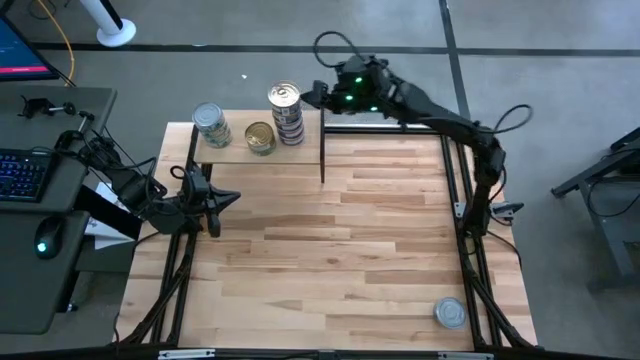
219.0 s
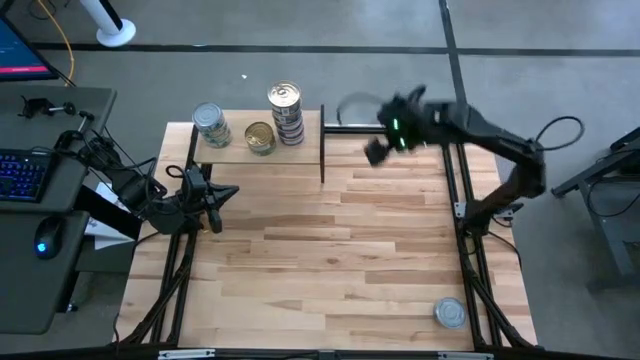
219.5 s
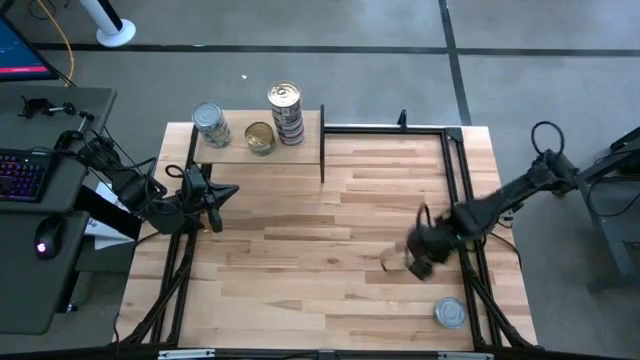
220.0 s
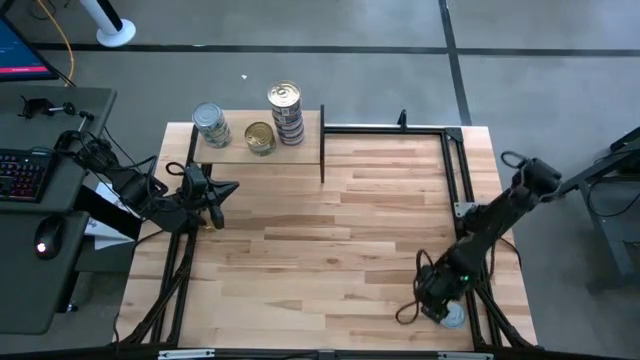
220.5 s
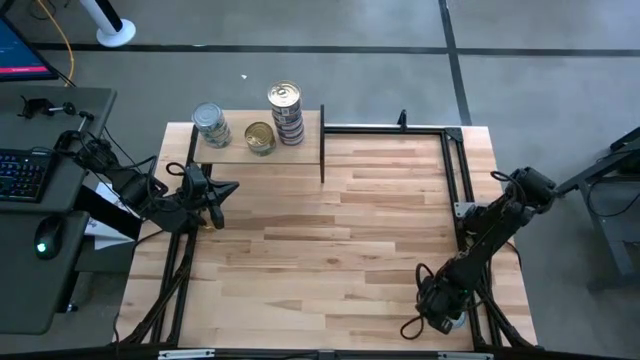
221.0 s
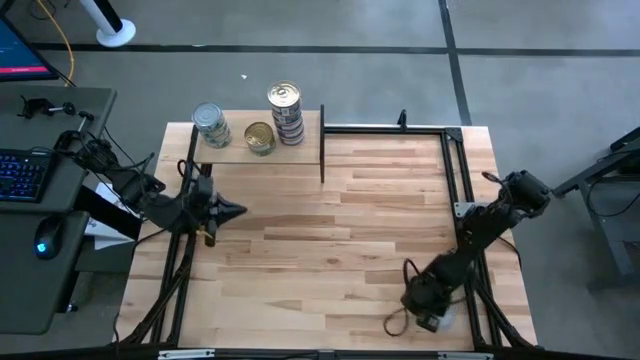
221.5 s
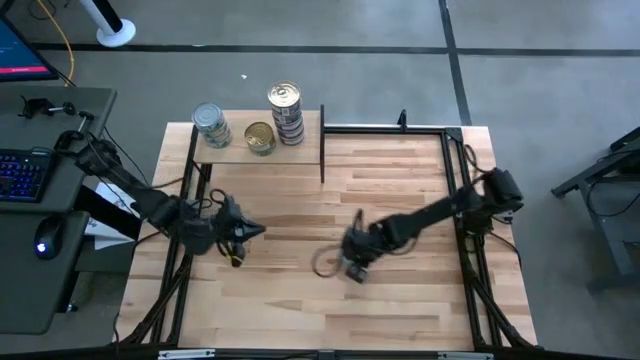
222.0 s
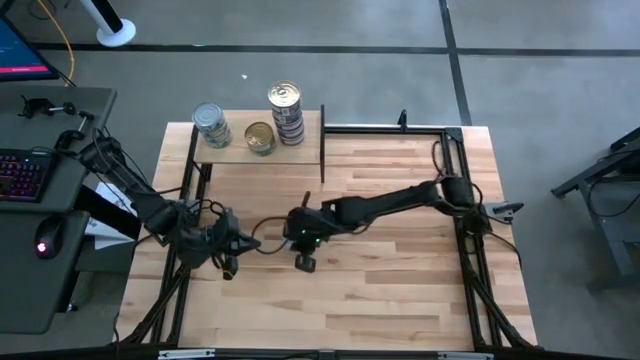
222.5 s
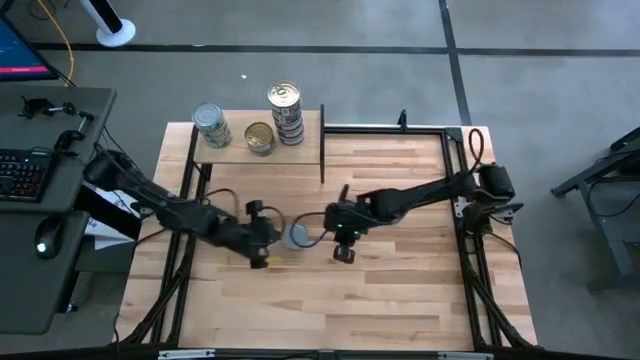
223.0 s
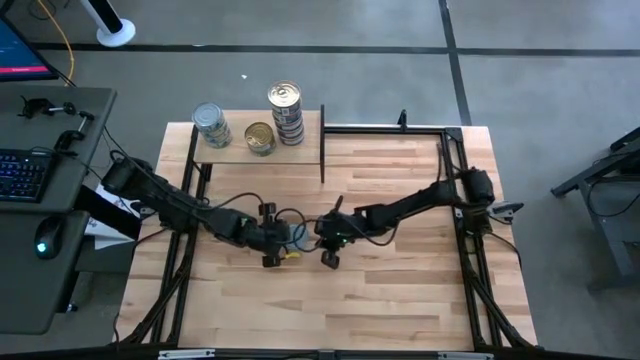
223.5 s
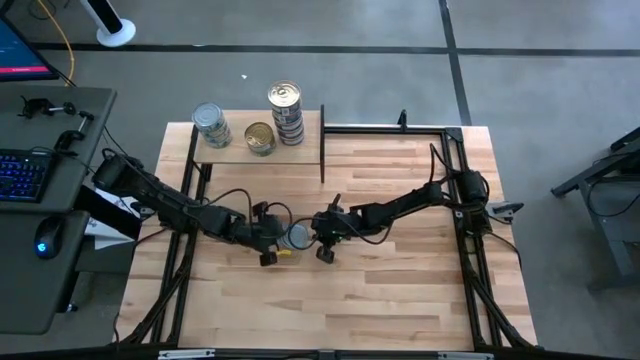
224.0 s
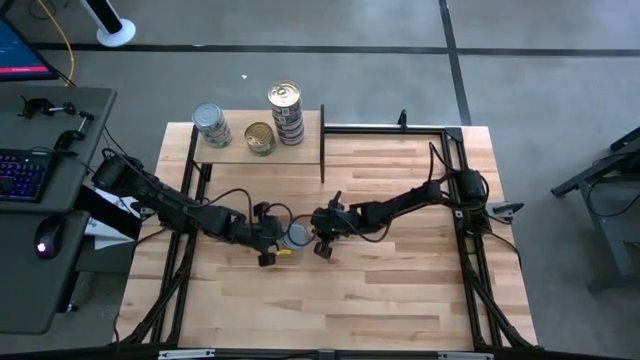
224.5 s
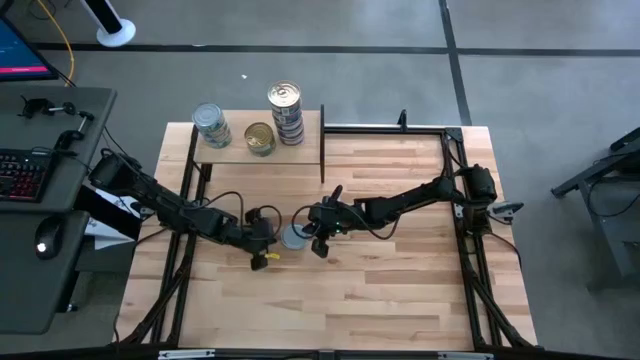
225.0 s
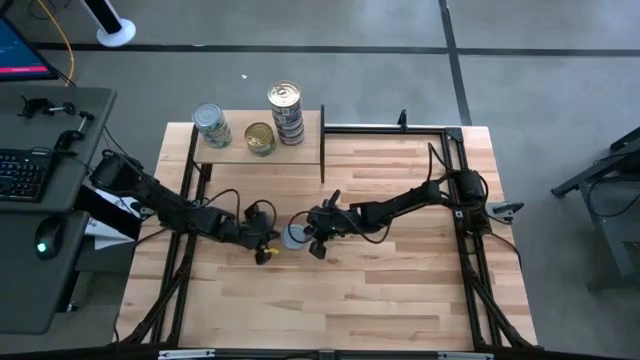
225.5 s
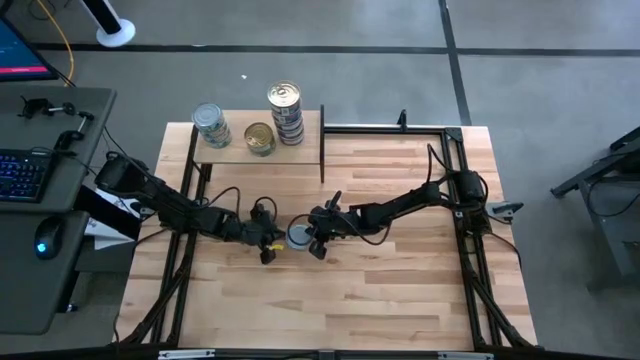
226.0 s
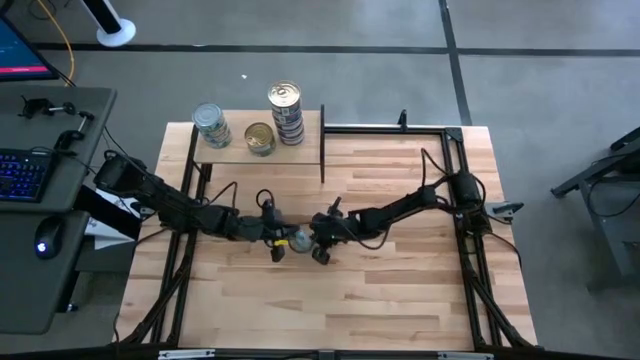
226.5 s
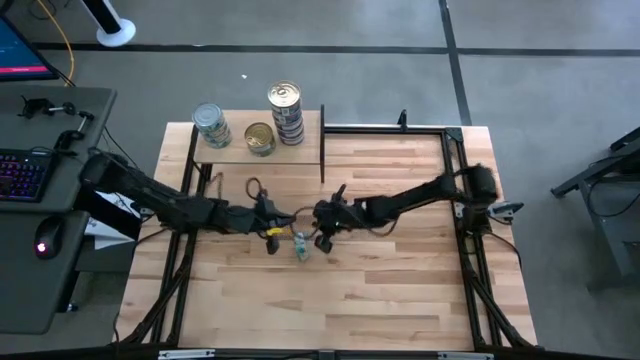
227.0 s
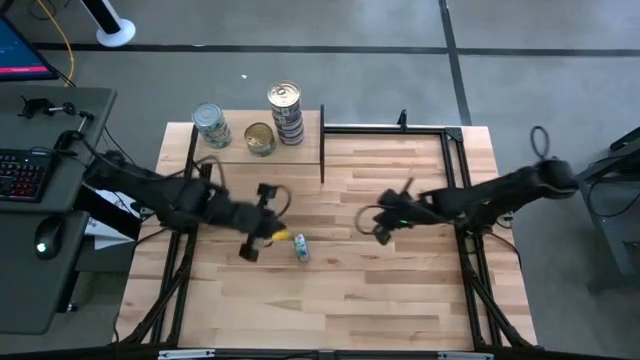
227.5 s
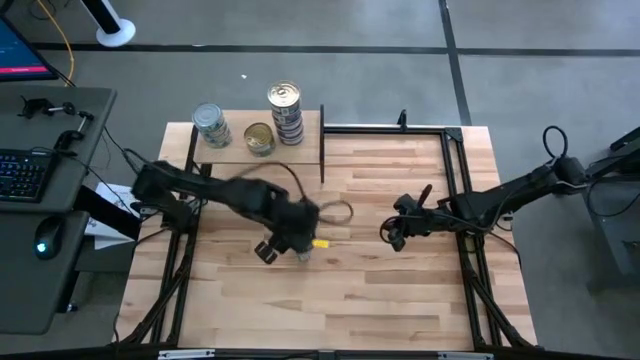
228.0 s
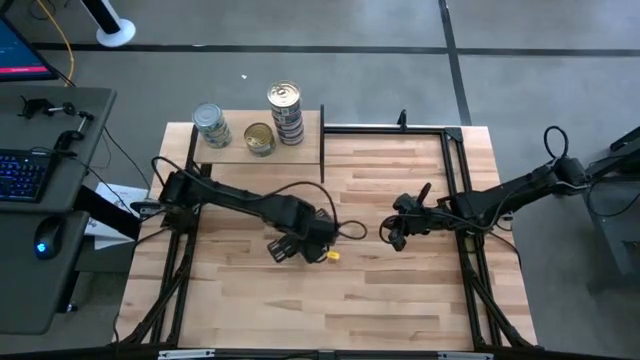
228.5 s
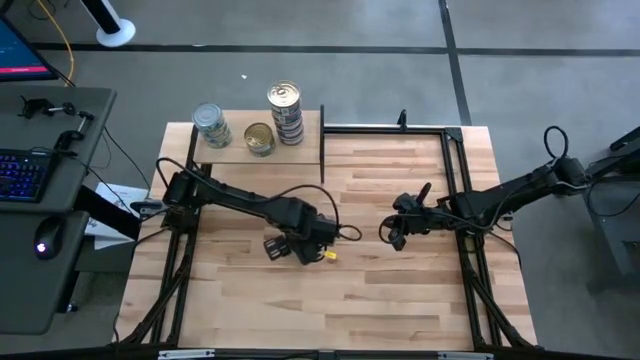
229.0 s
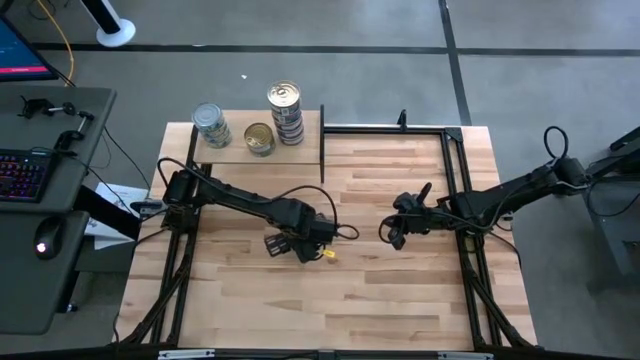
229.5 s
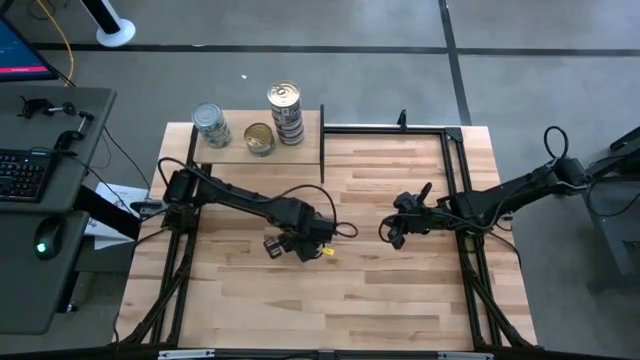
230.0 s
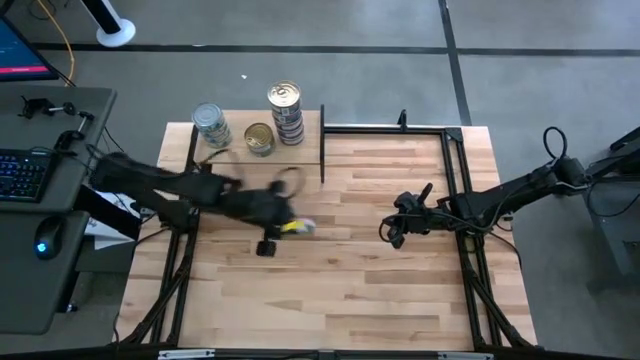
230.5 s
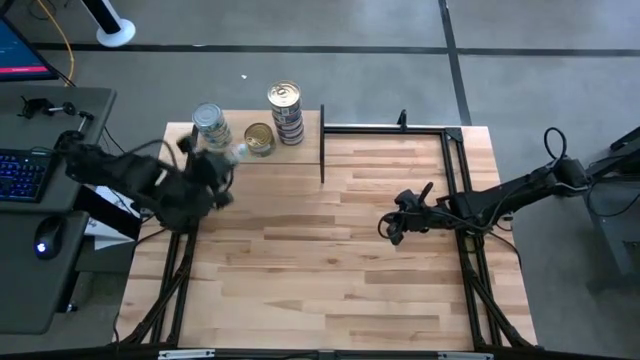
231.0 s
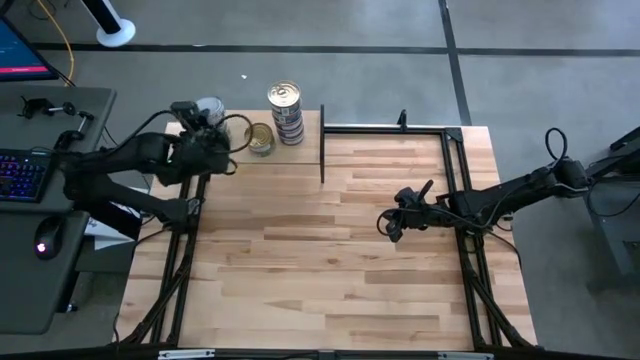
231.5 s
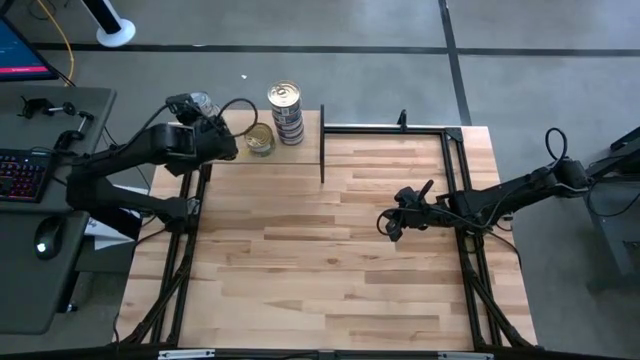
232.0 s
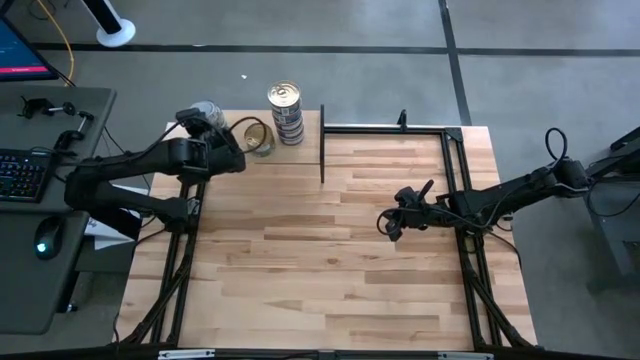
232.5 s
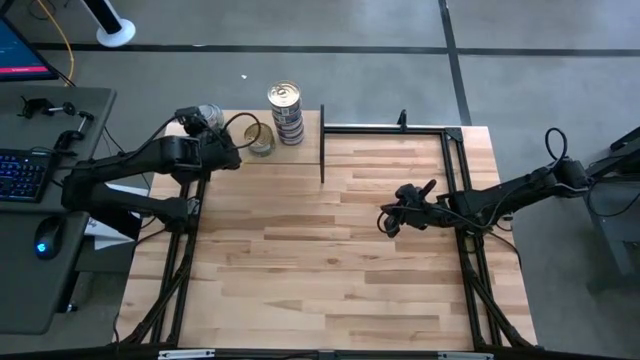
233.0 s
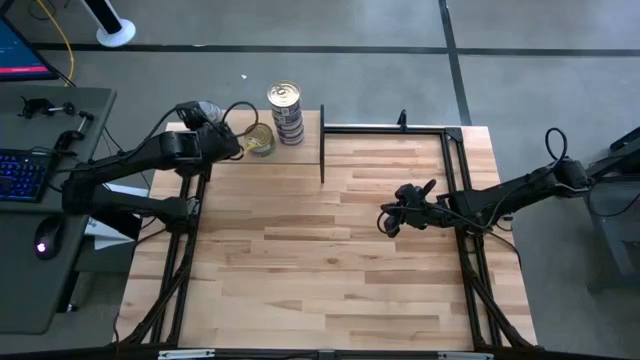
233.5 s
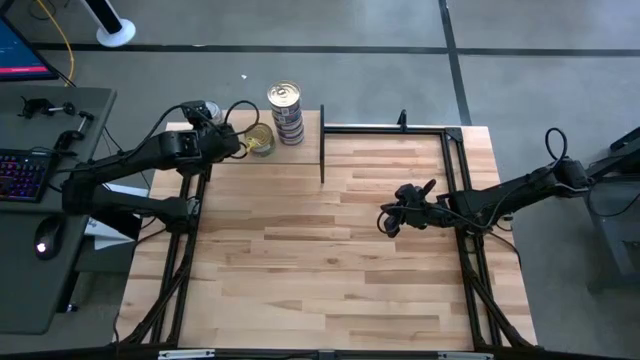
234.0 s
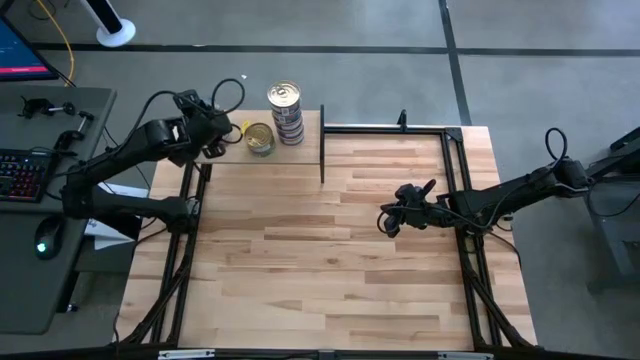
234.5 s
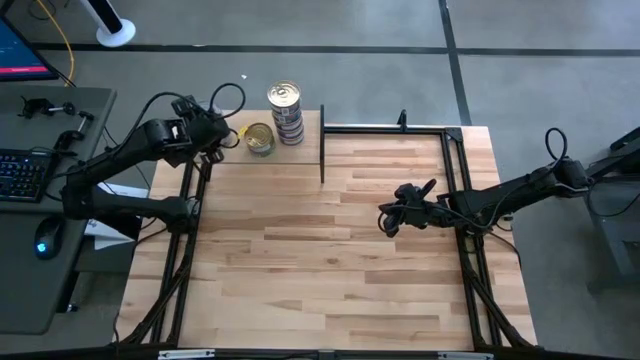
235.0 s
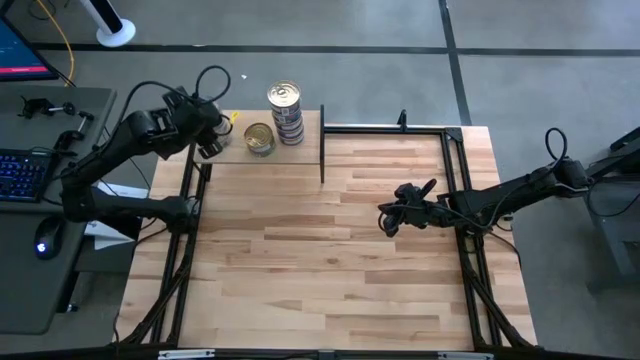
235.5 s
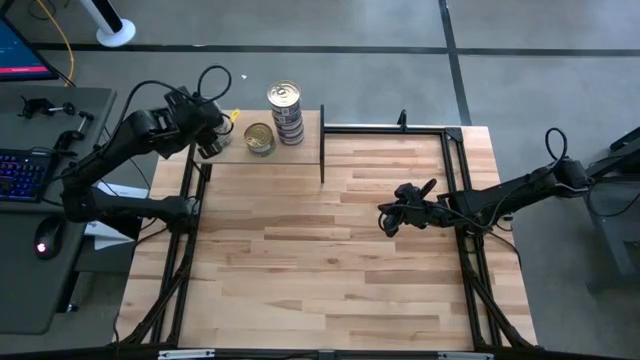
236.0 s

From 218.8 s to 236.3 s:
Task: Stack canned seafood by type on shelf
Stack the green-white tuna can on top of the green-white tuna cans on the shelf

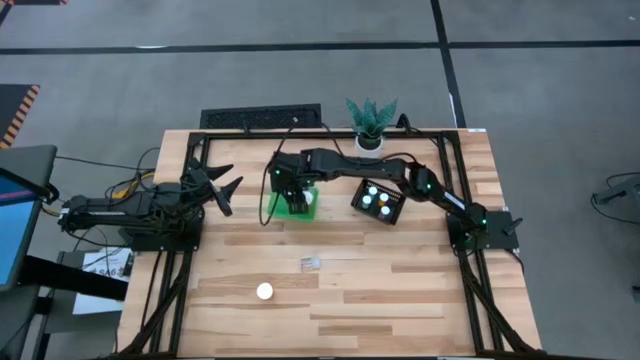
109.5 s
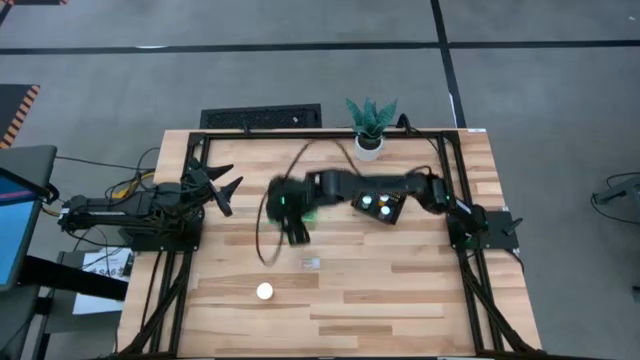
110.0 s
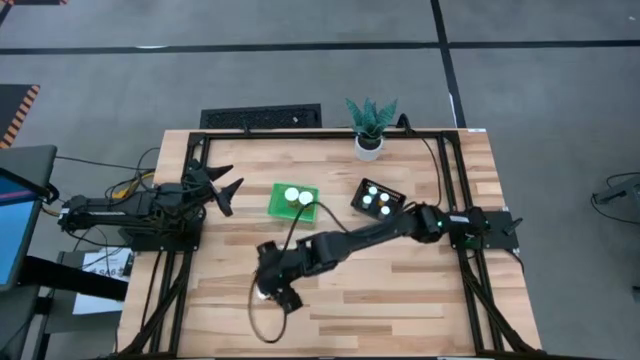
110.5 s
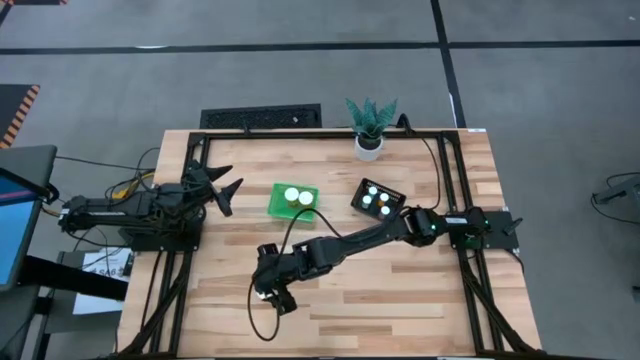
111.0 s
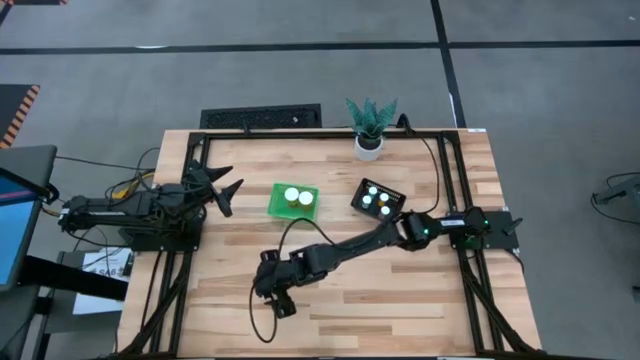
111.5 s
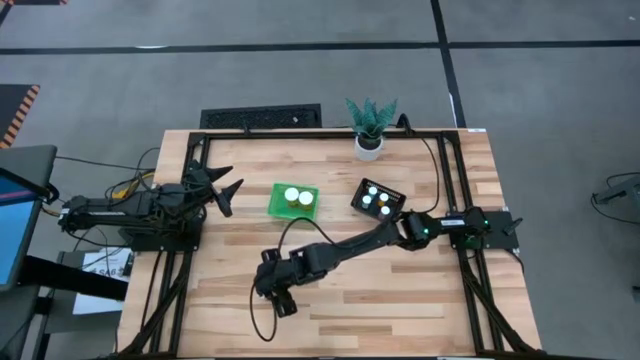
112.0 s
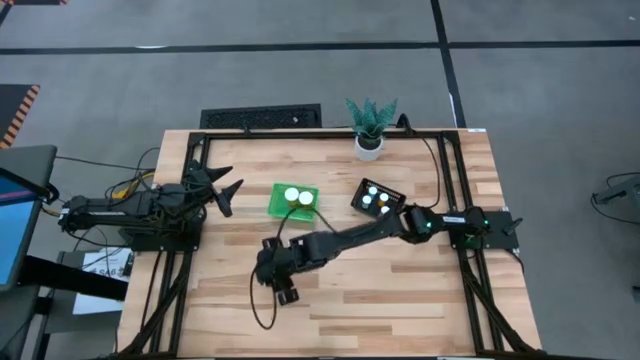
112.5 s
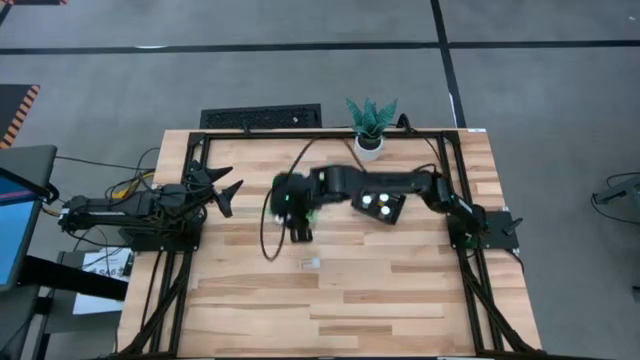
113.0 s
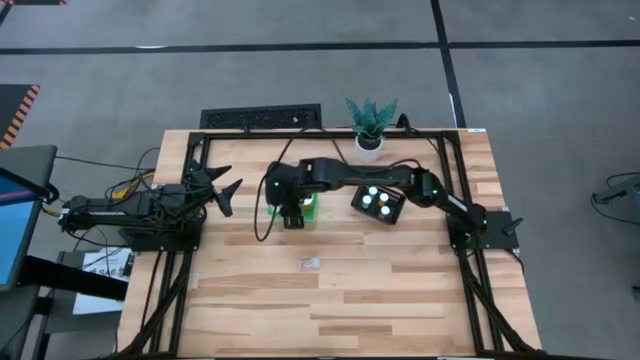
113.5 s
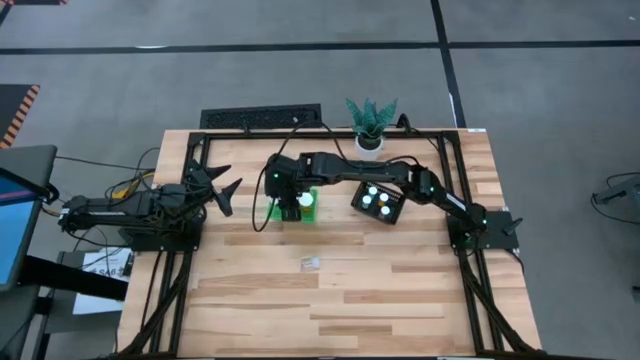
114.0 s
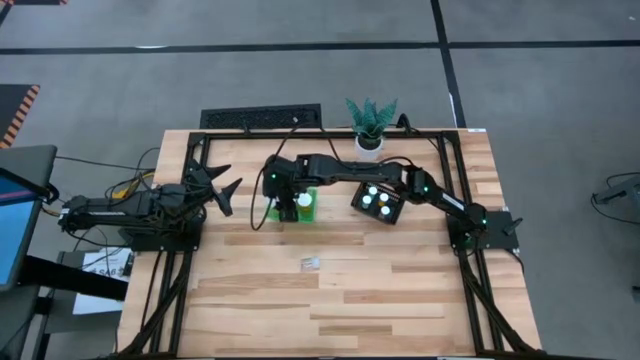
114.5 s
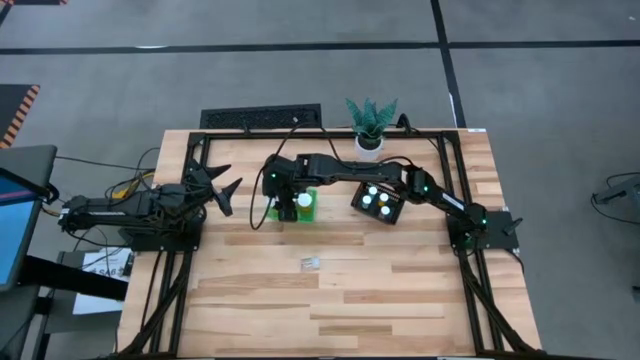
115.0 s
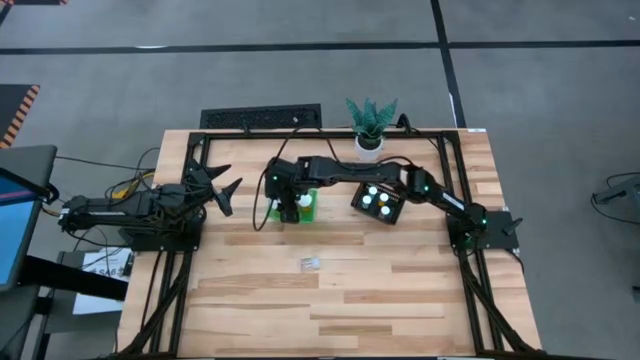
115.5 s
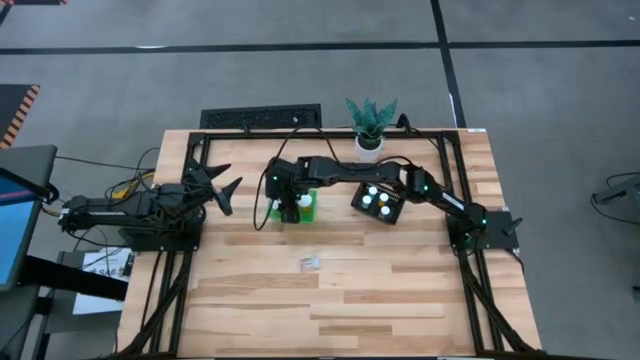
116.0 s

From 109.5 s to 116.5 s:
Task: Pick and place medicine bottles into bin by pill shape (circle, oval)
Put the orange capsule bottle into the green basket
